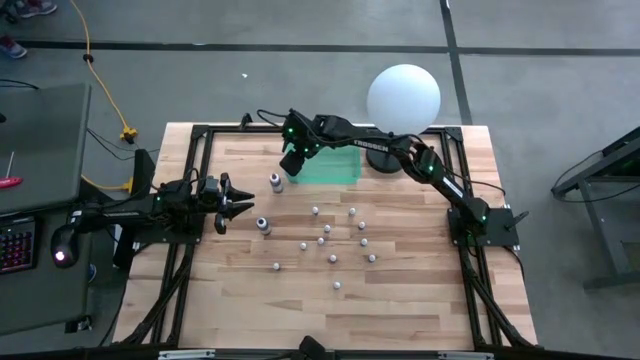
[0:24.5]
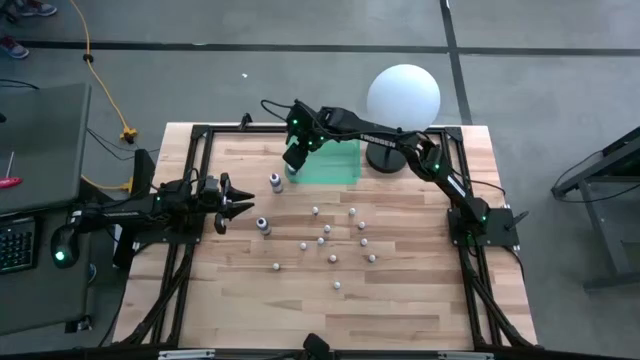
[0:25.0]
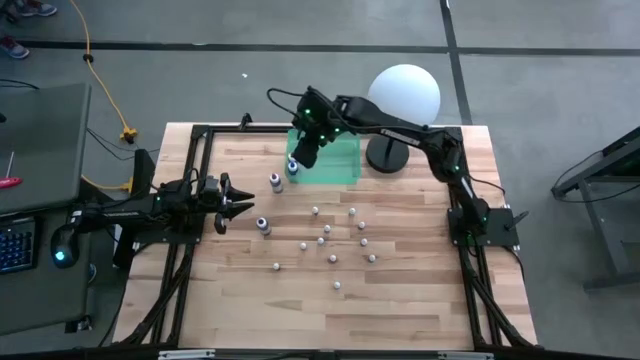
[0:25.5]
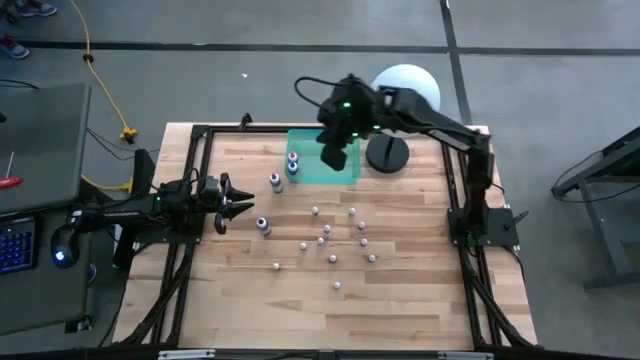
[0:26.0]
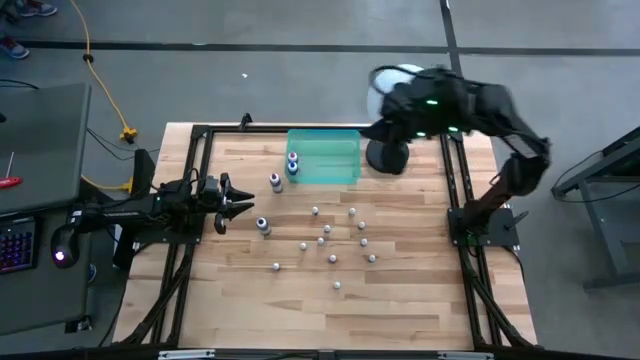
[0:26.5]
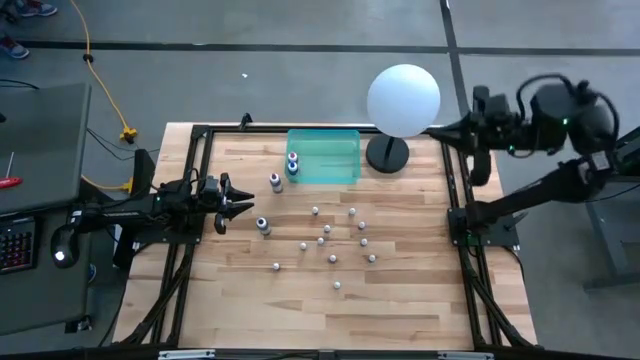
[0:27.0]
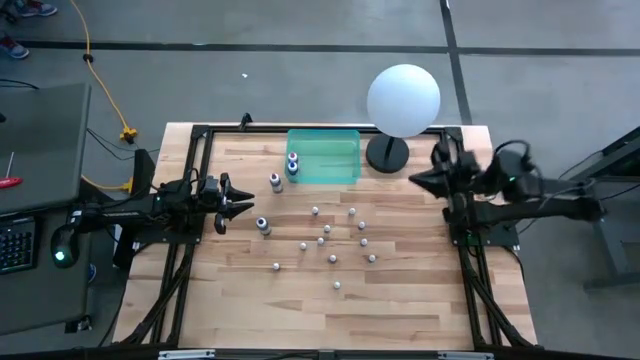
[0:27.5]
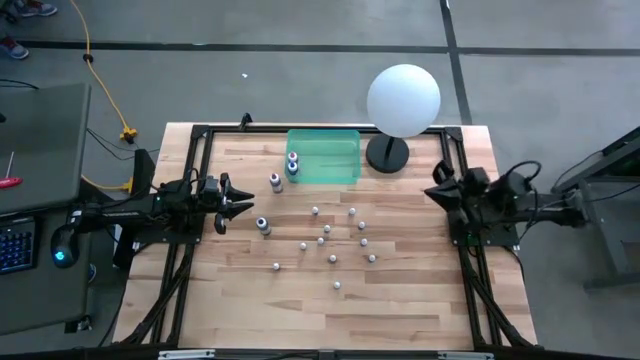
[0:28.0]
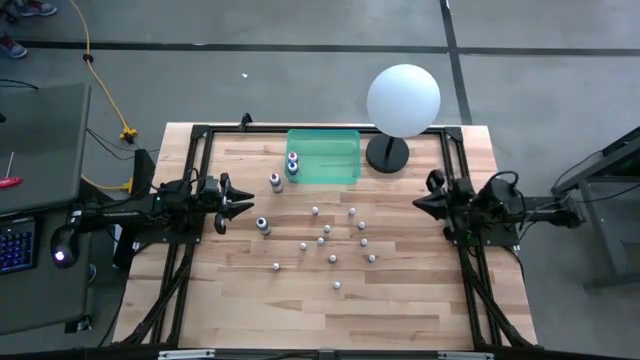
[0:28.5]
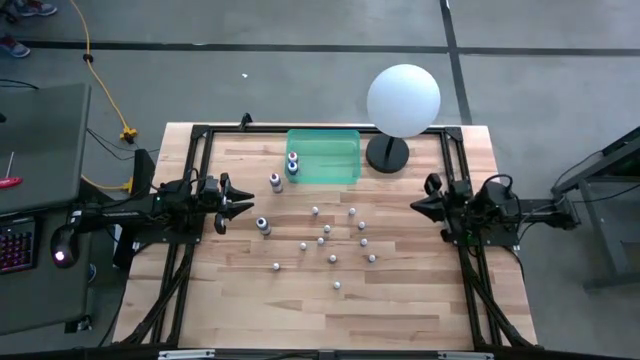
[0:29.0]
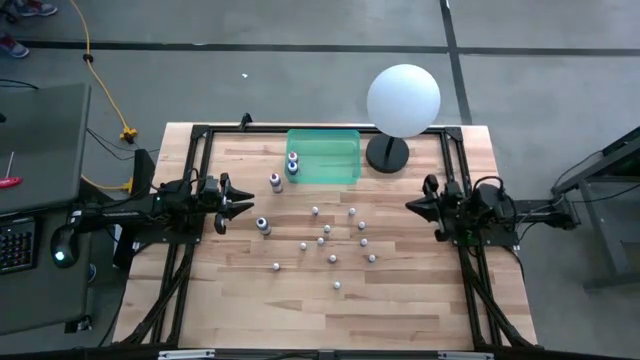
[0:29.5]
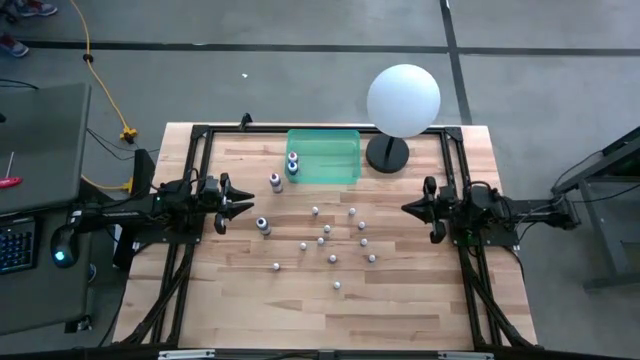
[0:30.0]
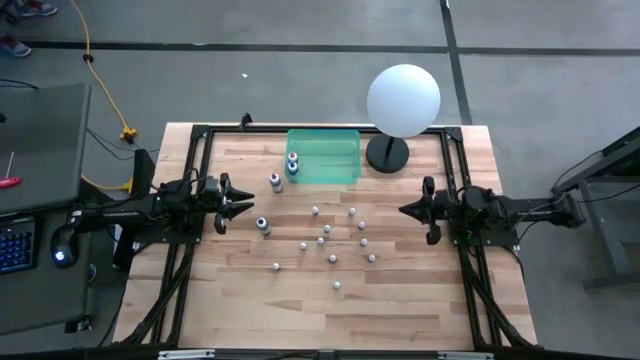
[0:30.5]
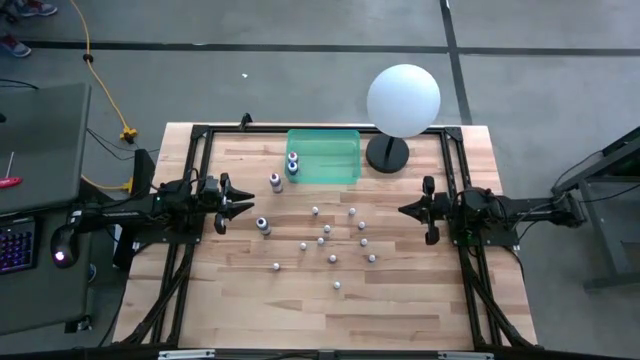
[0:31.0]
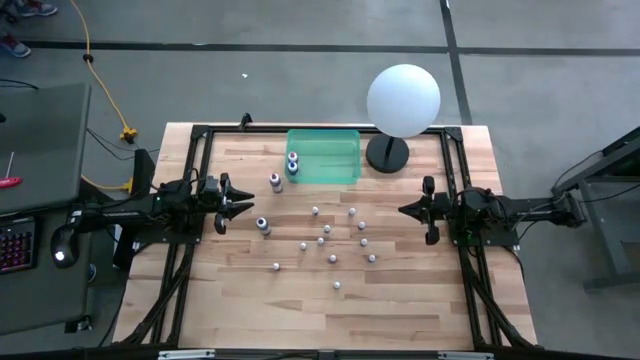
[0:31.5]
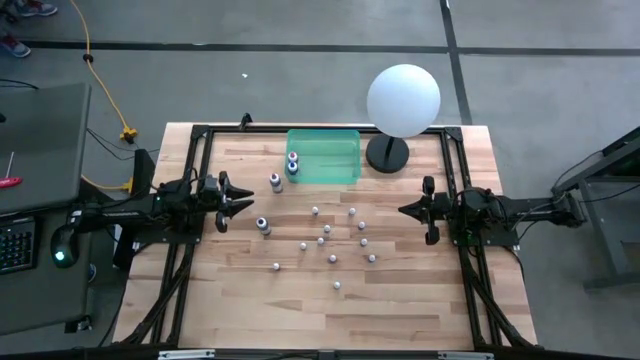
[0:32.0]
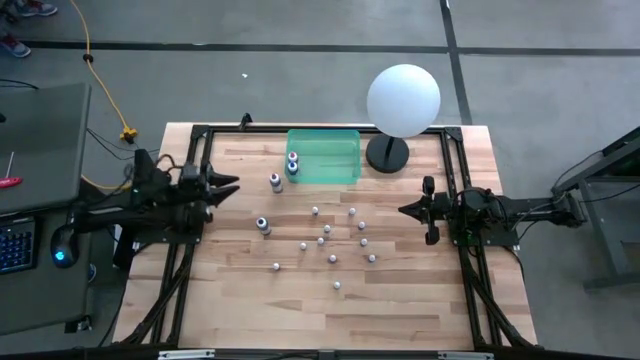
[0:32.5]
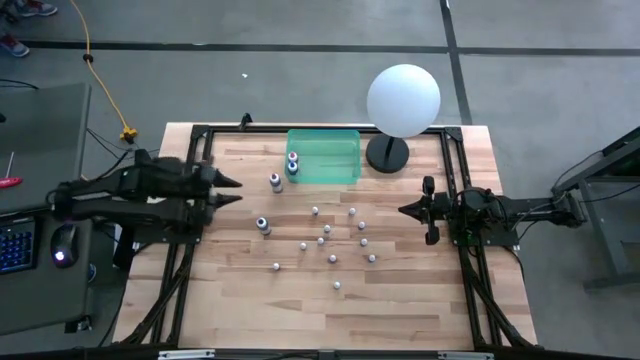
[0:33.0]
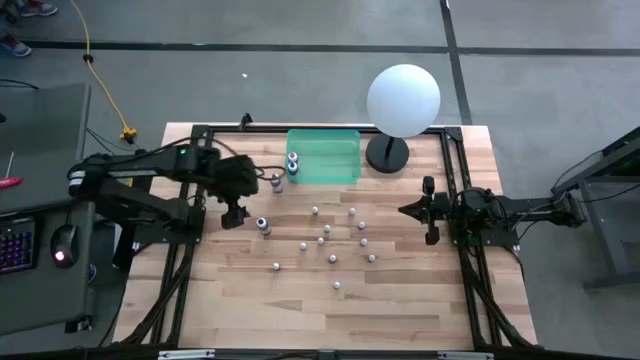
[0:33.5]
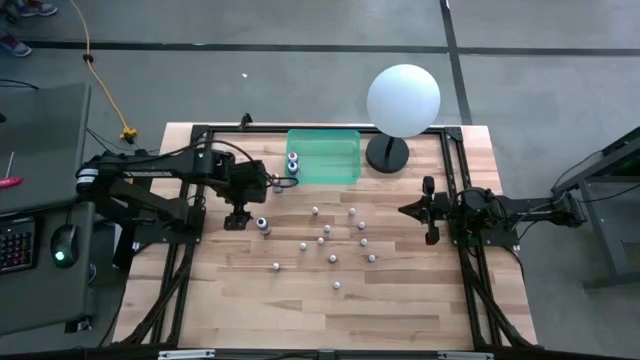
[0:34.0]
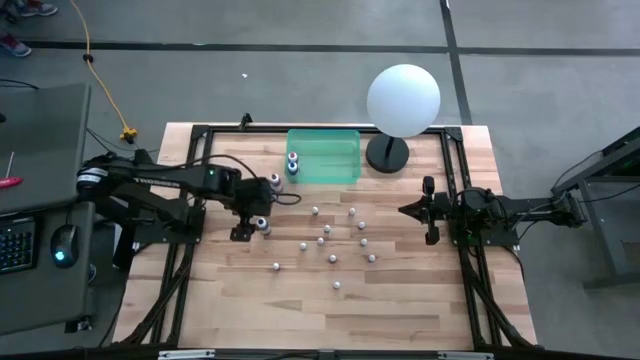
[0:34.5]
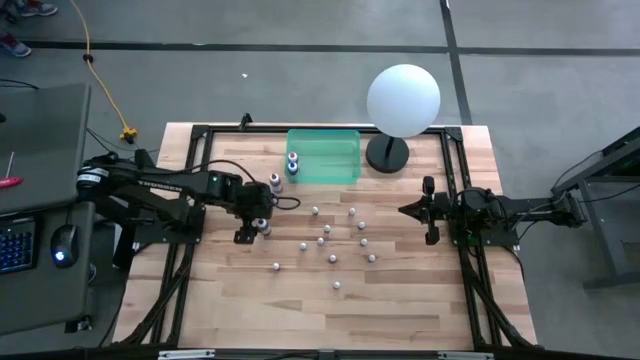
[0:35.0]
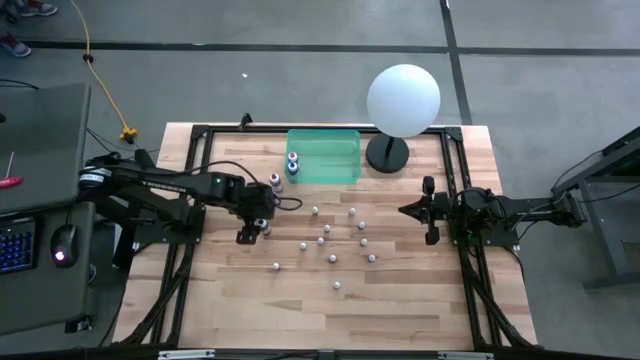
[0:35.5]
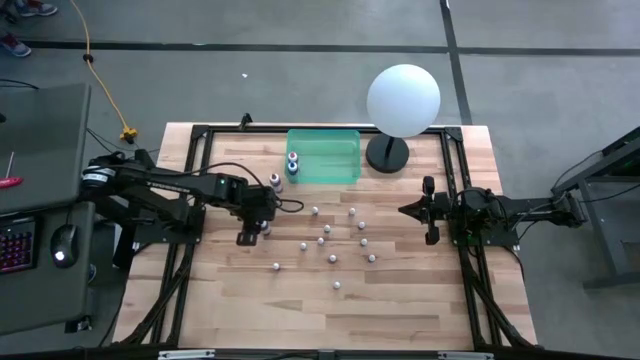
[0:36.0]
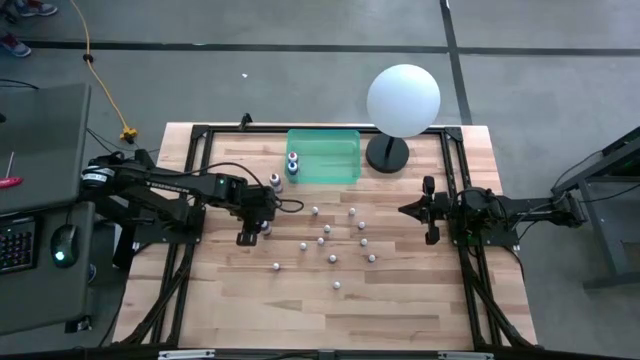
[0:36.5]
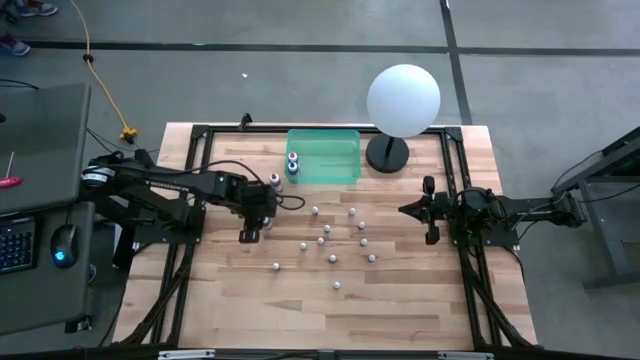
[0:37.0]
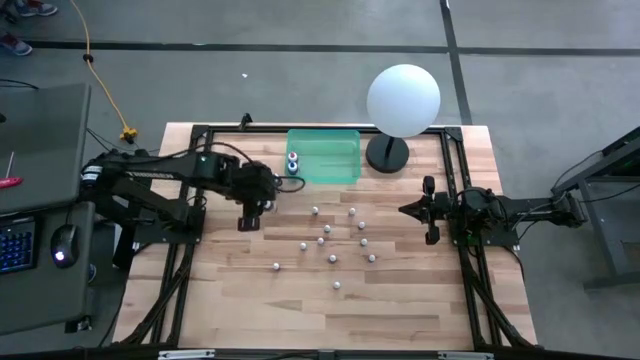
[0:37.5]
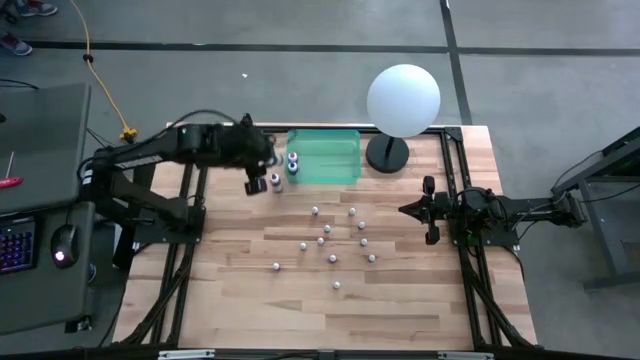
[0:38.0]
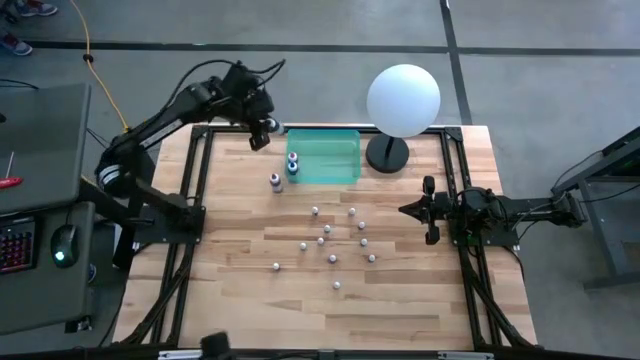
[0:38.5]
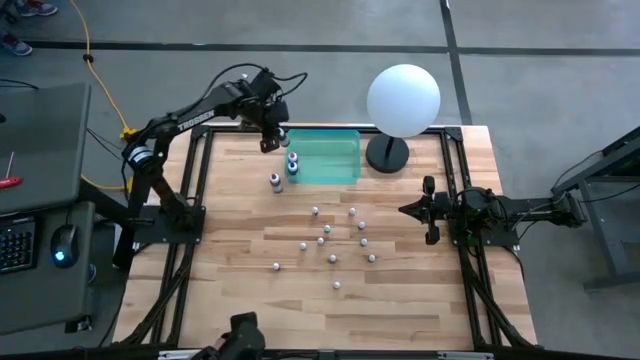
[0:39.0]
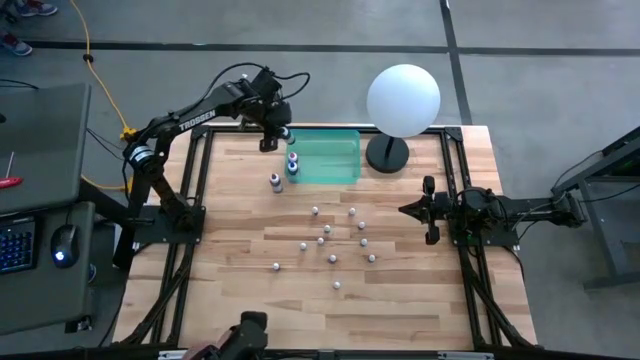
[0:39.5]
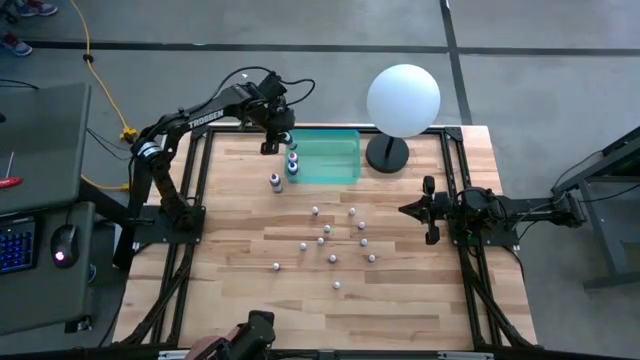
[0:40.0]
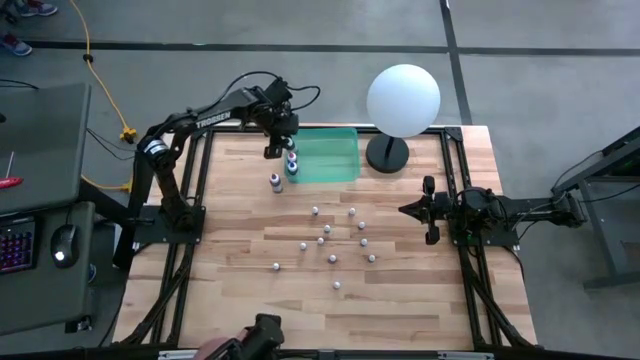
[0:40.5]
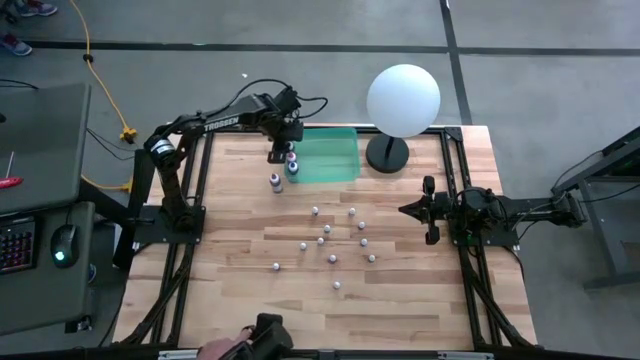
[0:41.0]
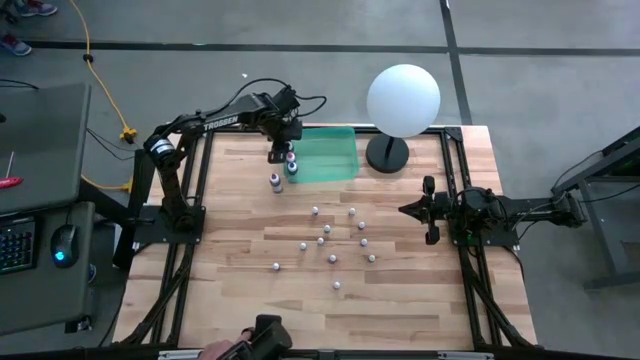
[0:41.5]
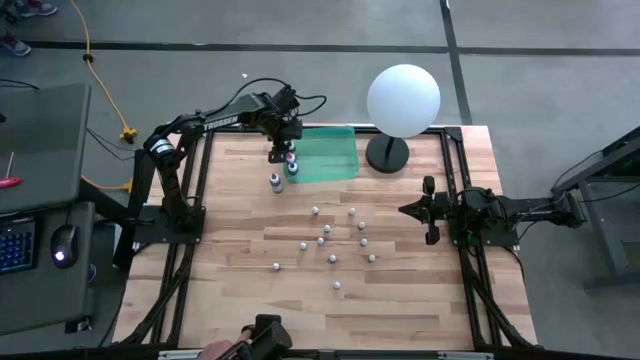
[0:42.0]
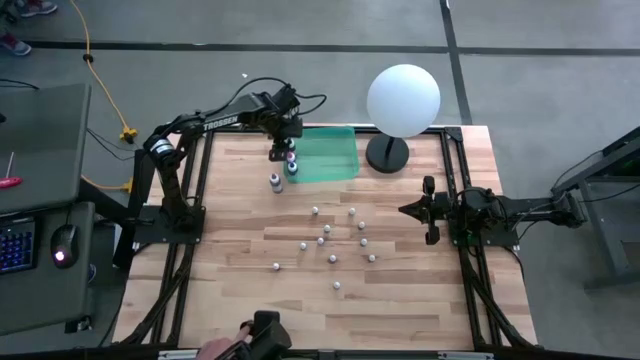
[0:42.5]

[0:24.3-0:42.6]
Task: Pick & Place food coloring
Put the large black food coloring bottle into the green bin
